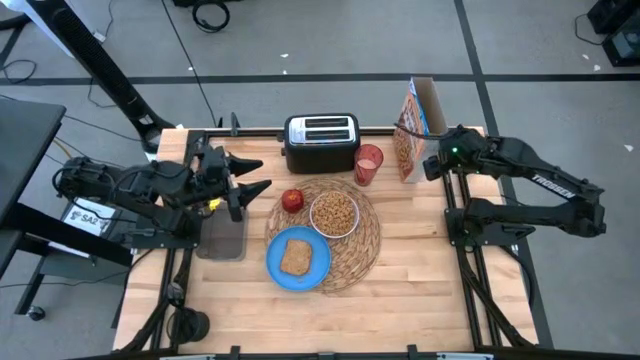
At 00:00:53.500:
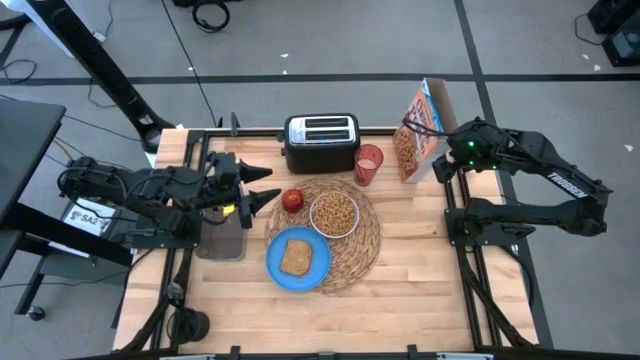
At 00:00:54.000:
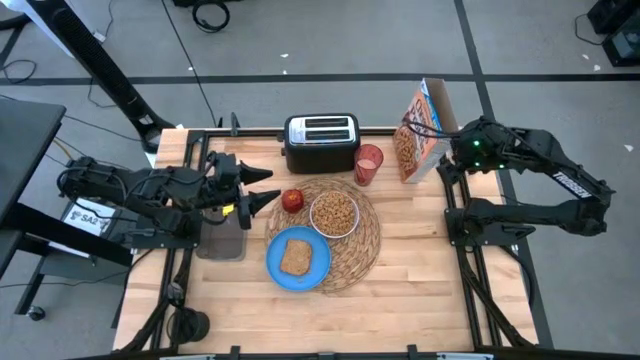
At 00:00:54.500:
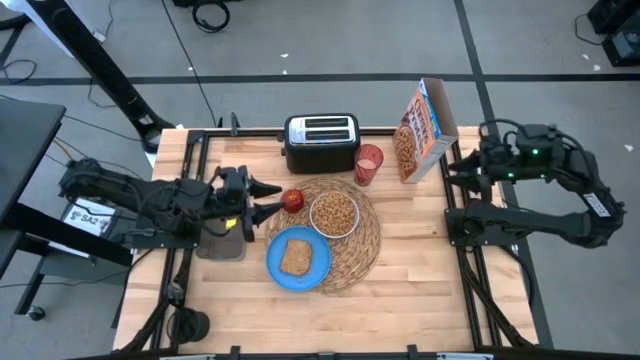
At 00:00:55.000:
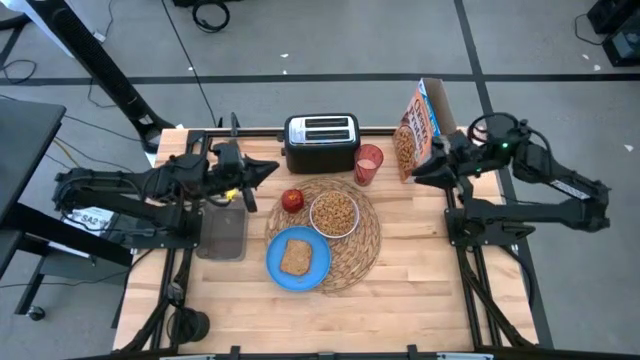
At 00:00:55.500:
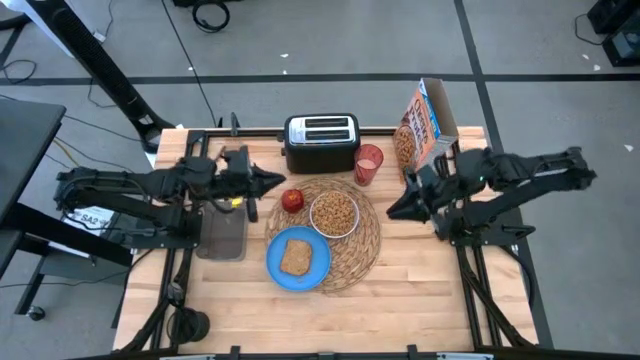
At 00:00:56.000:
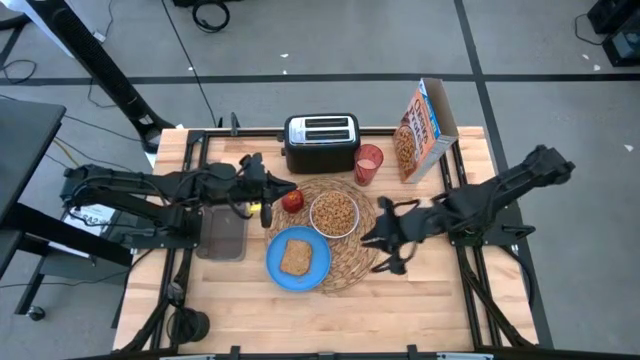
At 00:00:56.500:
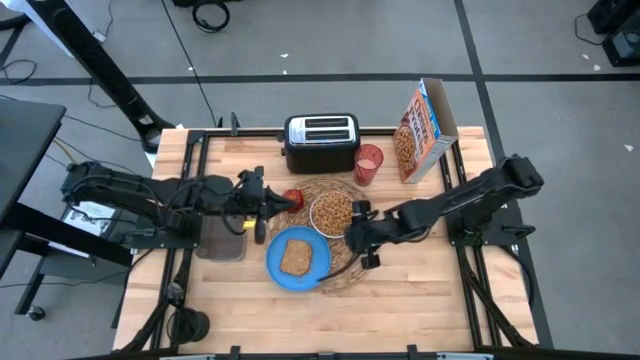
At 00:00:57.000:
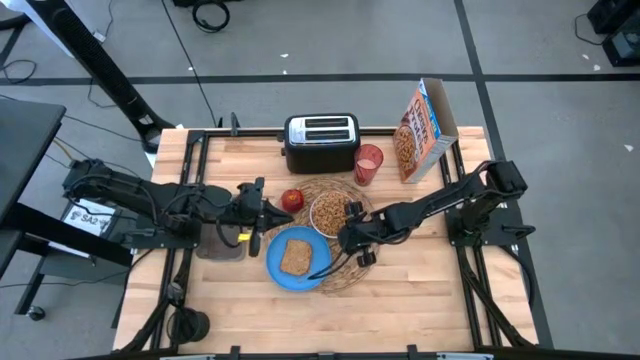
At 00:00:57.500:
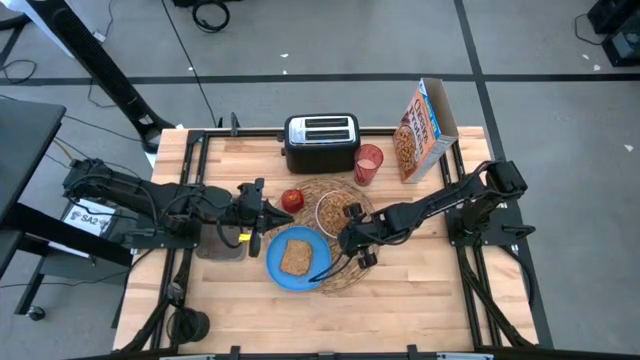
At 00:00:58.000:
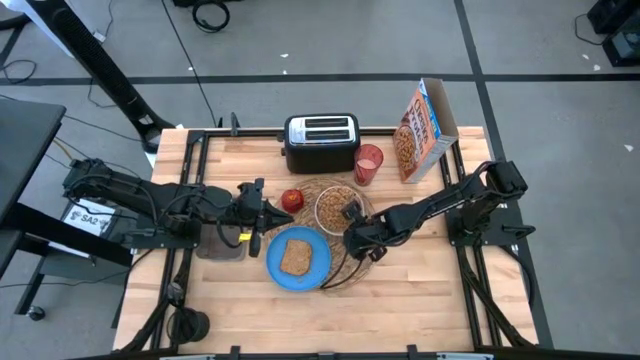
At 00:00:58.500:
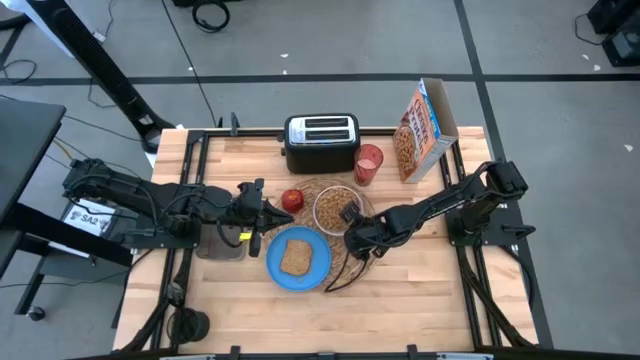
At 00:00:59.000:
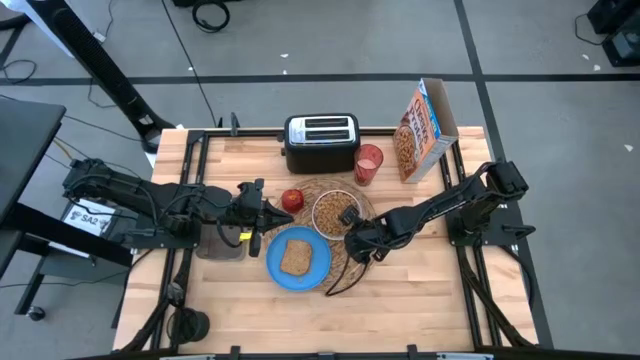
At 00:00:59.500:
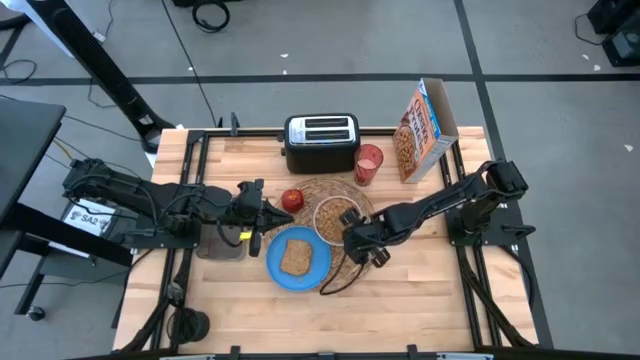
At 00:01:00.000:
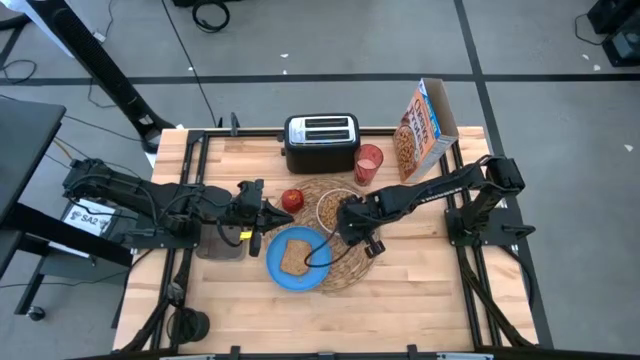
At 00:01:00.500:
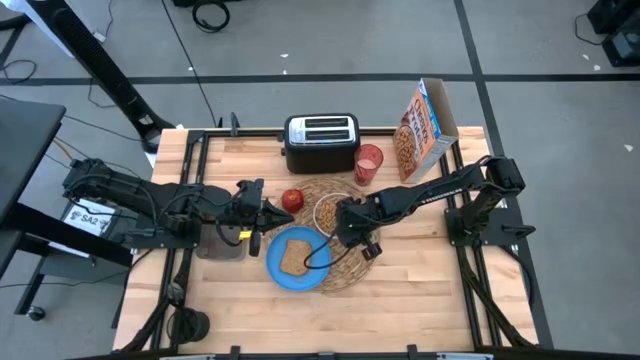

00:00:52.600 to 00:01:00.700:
Task: Arrange a breakfast setting
Adjust the white bowl on the brown woven mat

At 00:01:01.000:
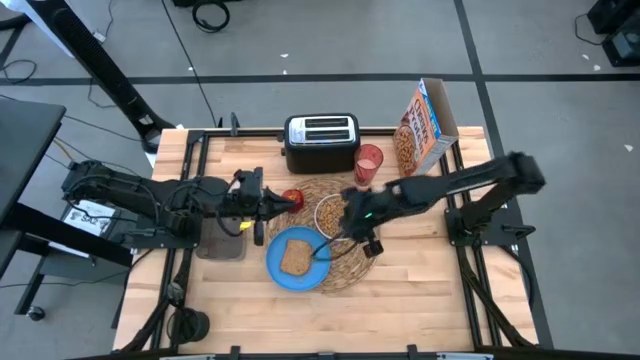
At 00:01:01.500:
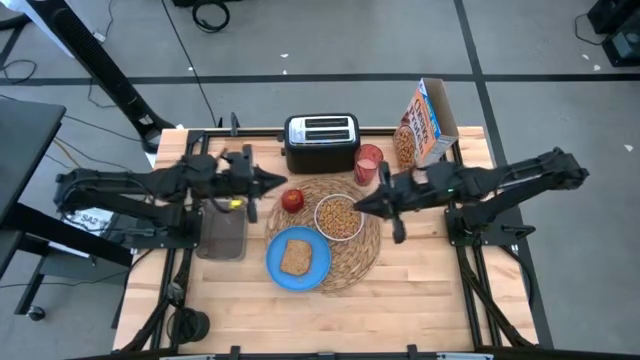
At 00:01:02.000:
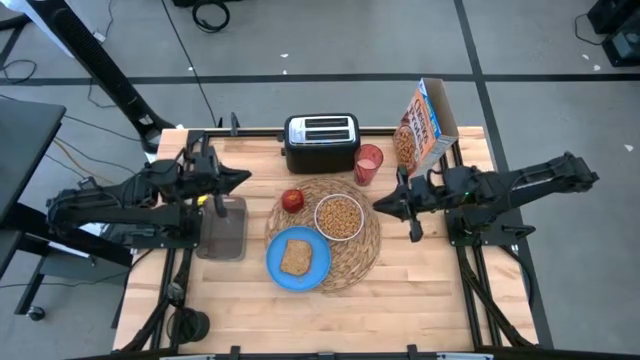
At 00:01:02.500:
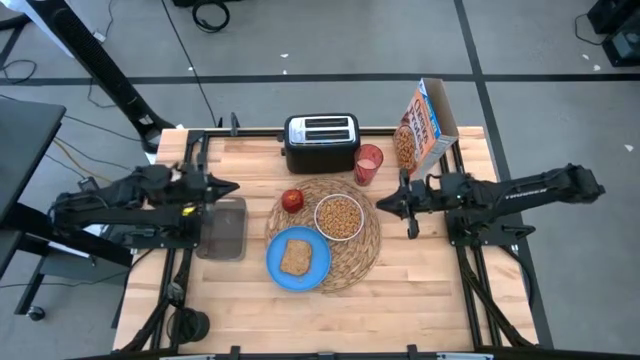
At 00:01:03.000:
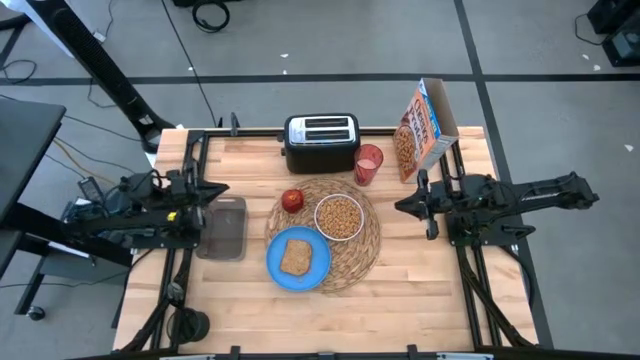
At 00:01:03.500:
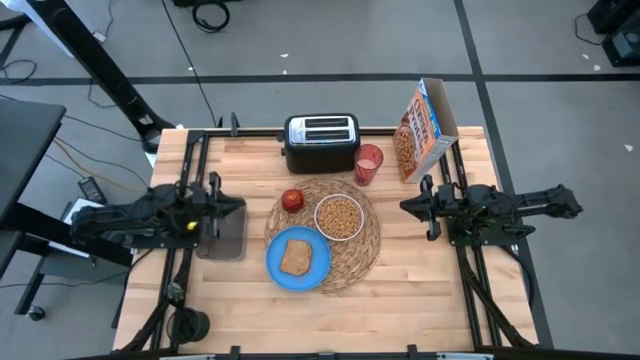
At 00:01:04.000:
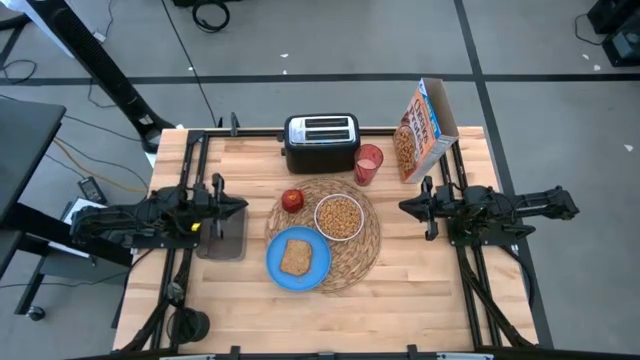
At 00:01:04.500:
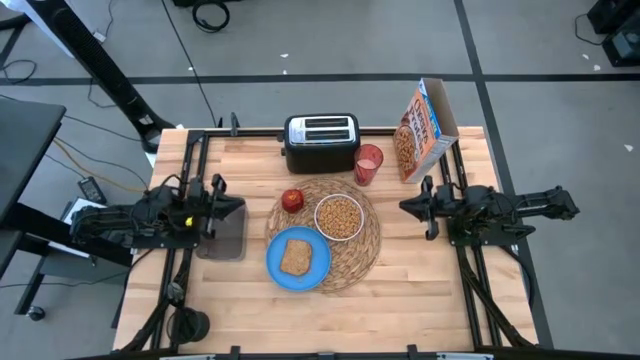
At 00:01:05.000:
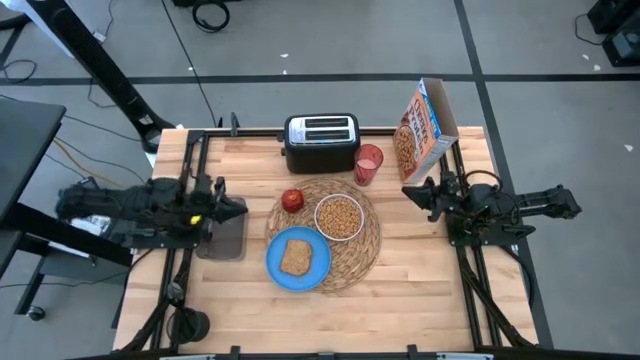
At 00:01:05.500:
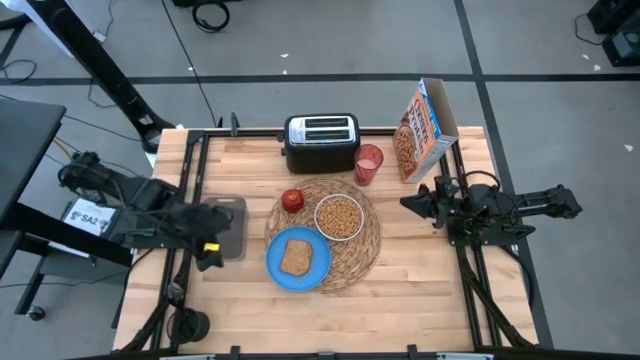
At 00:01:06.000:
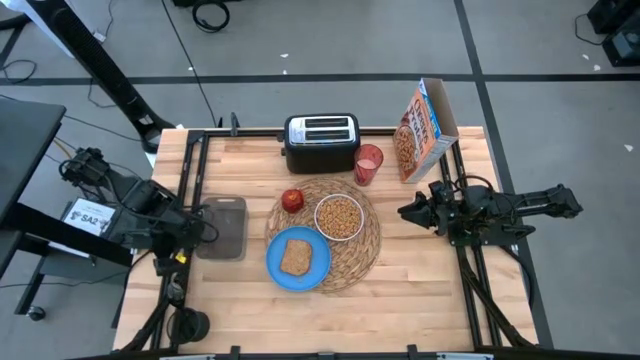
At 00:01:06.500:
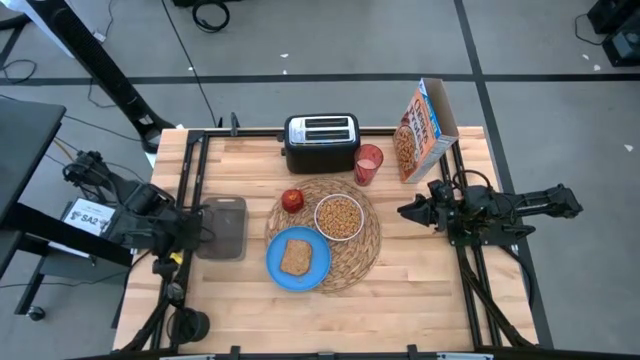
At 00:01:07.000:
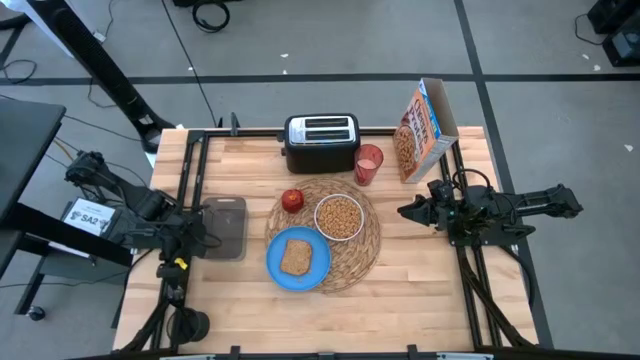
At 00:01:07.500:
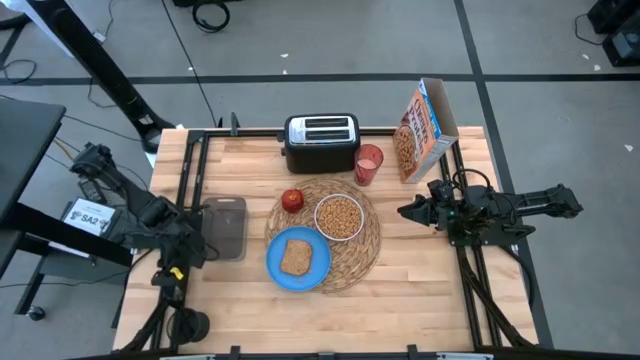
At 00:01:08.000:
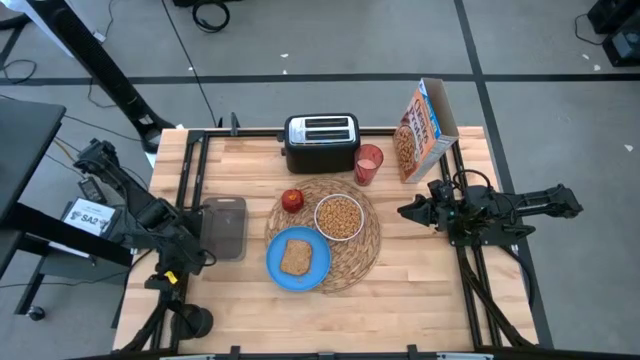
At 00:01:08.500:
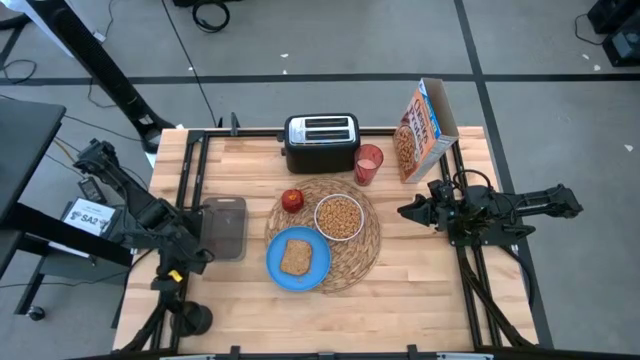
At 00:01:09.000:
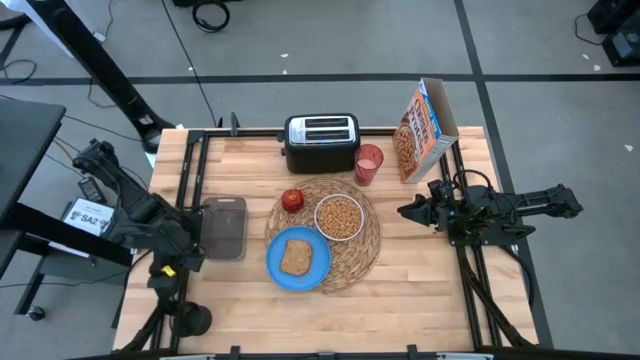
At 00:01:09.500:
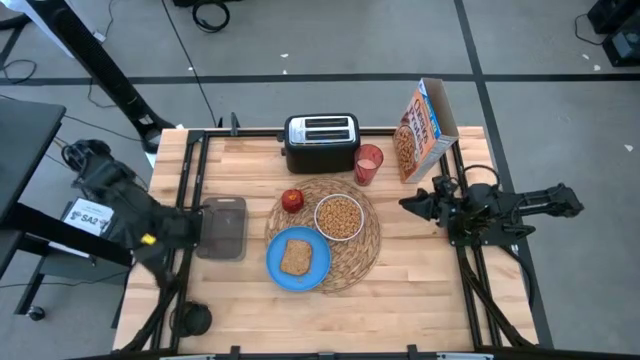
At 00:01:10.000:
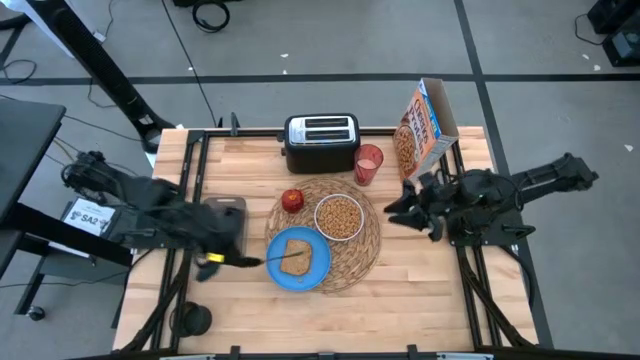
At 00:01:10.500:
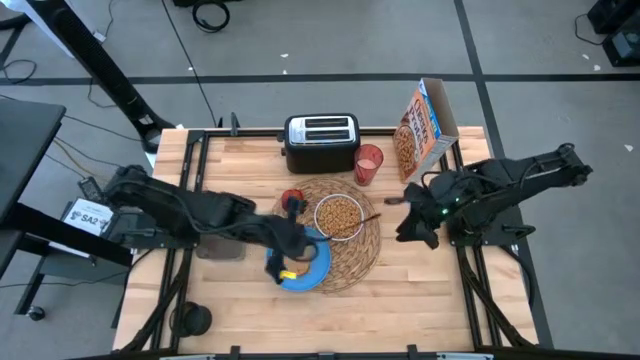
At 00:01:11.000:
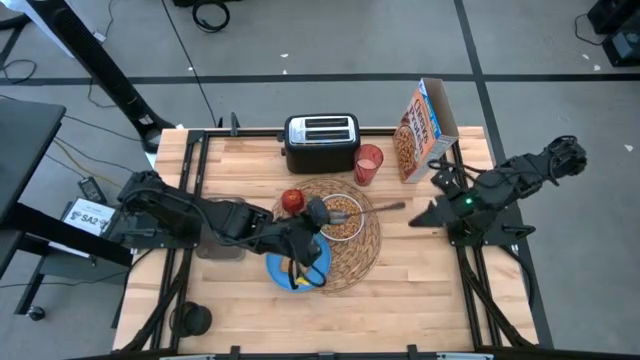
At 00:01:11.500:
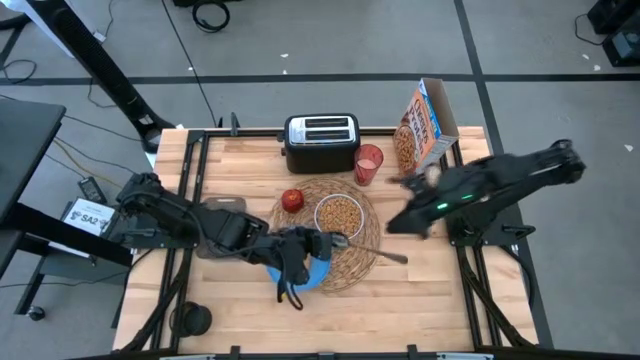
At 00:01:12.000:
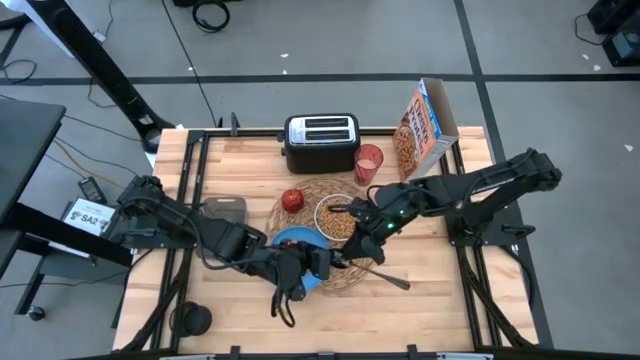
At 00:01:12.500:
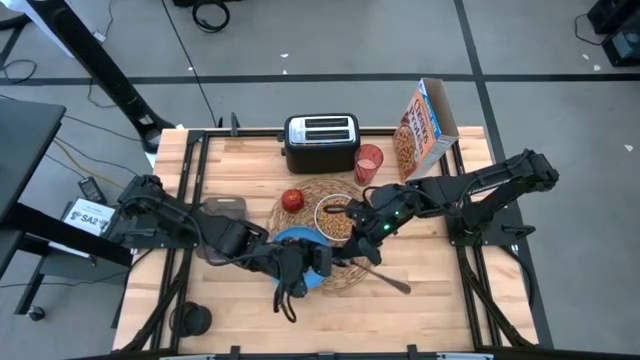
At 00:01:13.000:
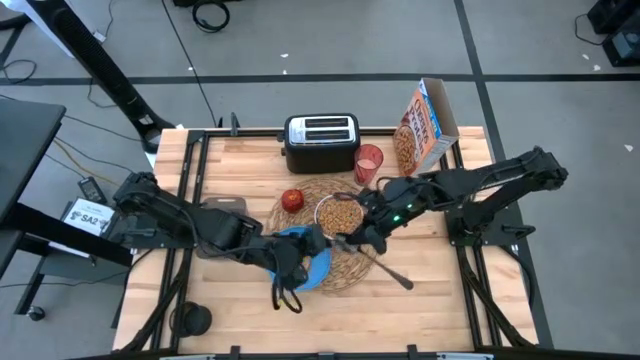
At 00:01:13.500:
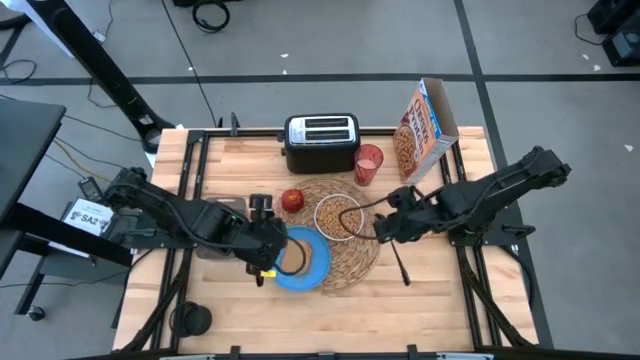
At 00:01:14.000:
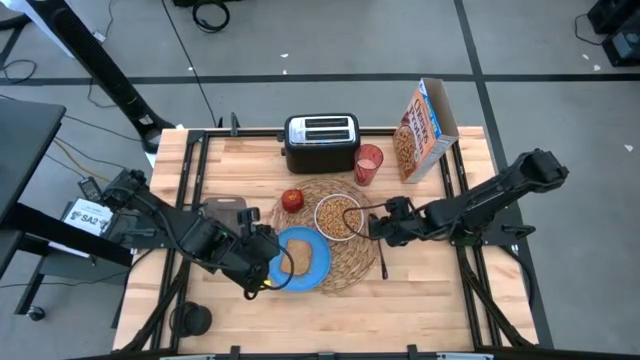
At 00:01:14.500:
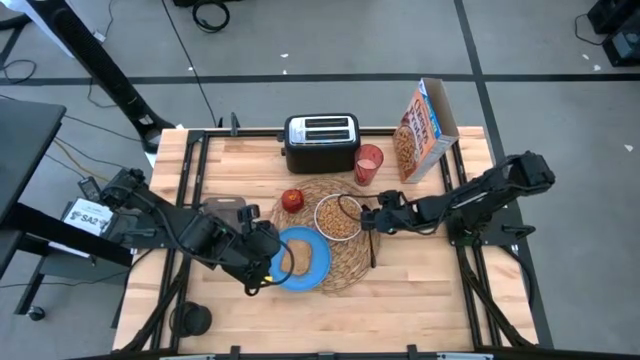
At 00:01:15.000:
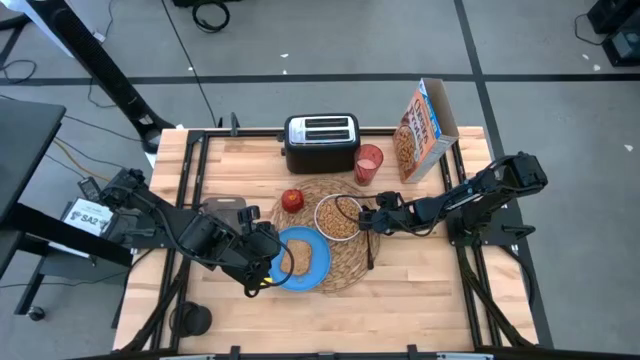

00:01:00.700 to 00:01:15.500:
Put the black spoon to the right of the white bowl on the brown woven mat
